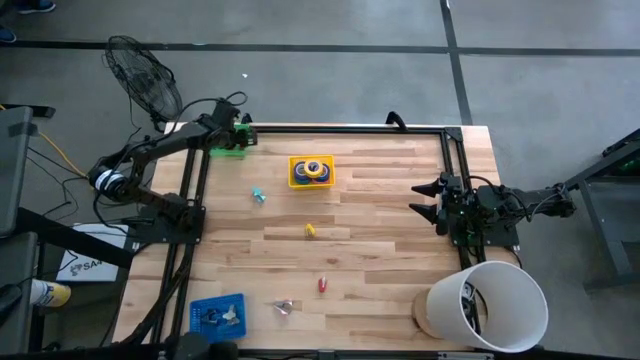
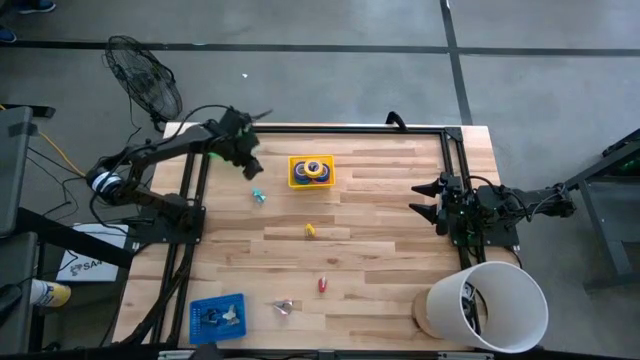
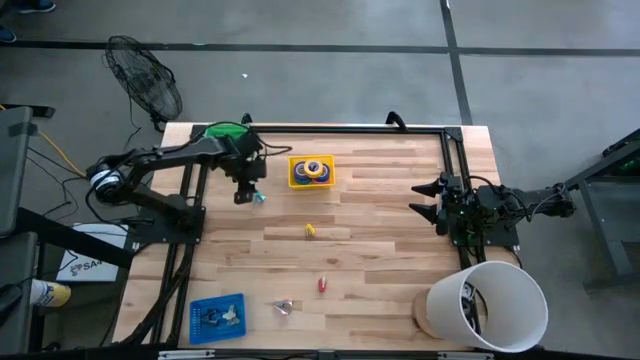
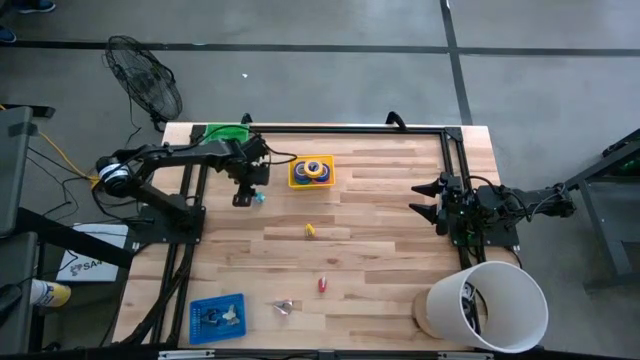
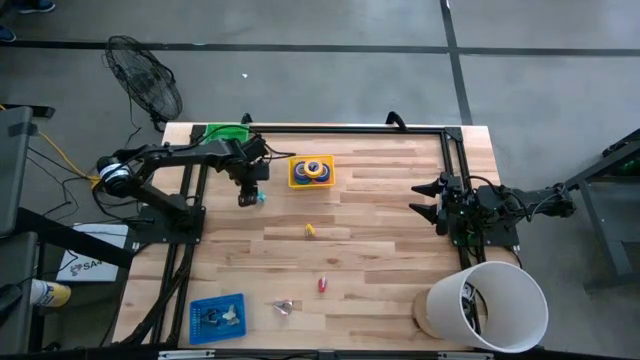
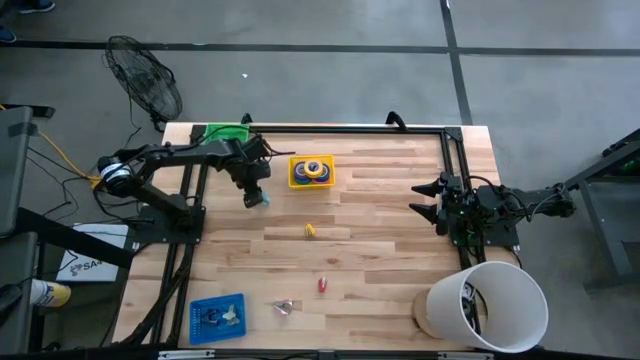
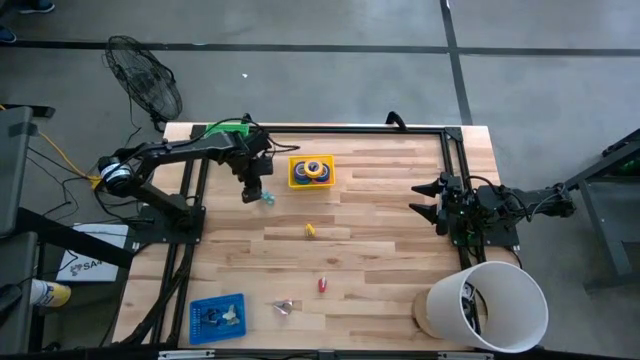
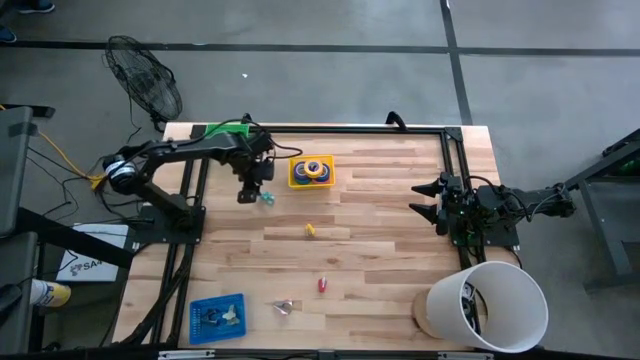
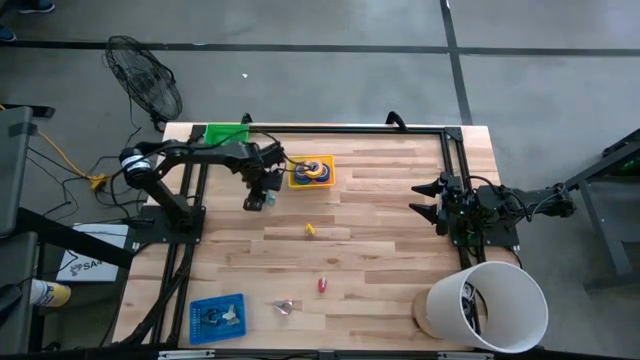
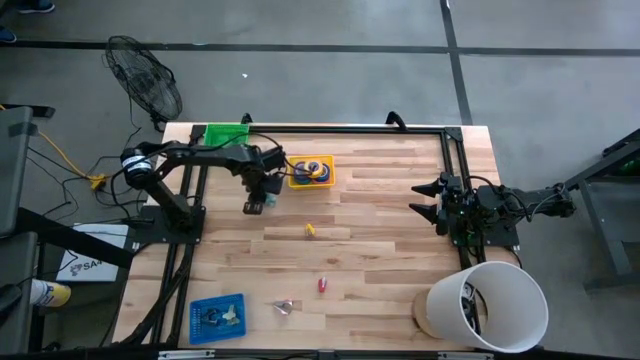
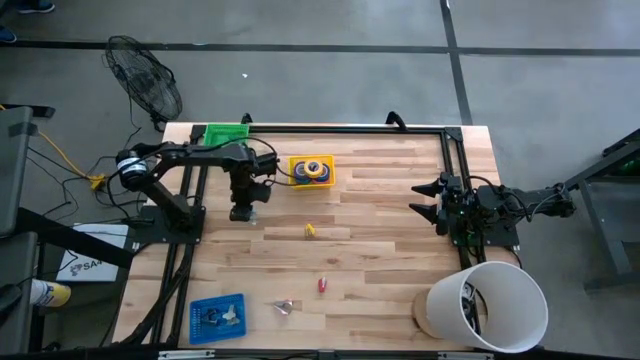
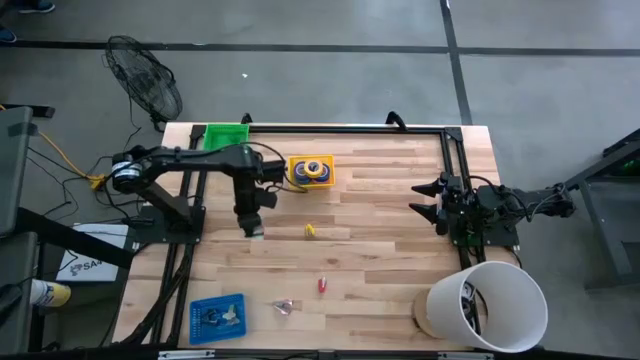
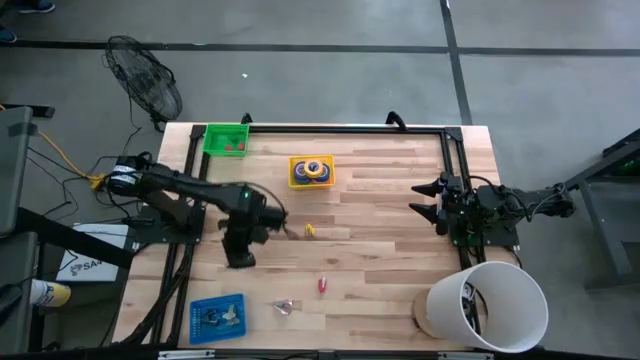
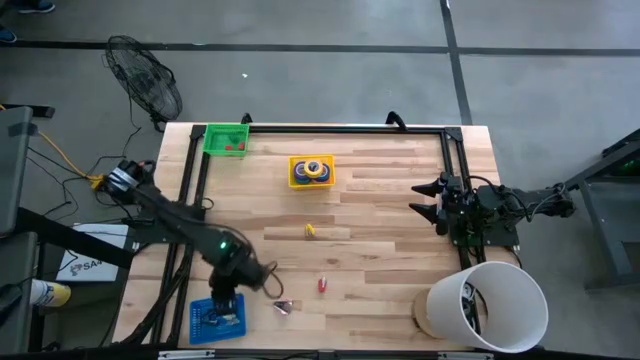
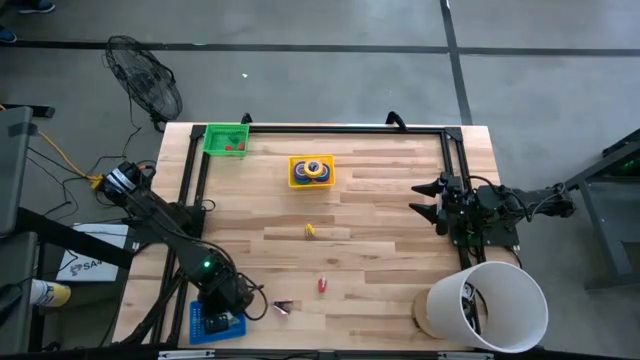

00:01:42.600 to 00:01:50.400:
Task: Pick and place Stapler, Stapler remover, tape
Put the light blue staple remover into the blue bin

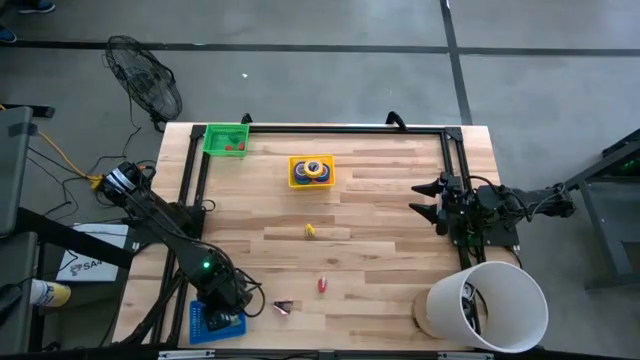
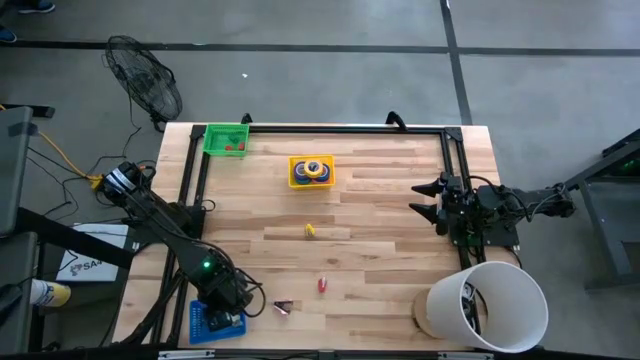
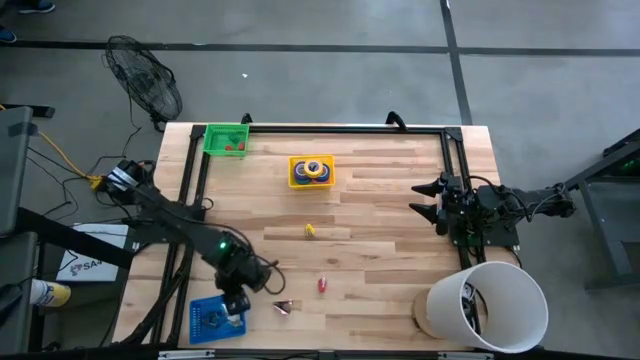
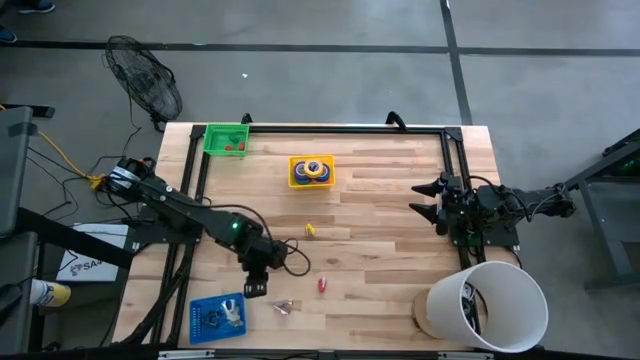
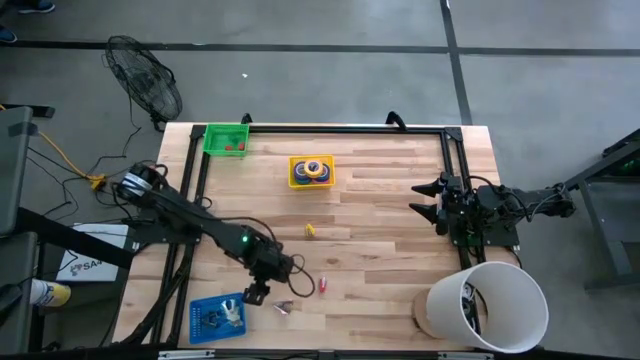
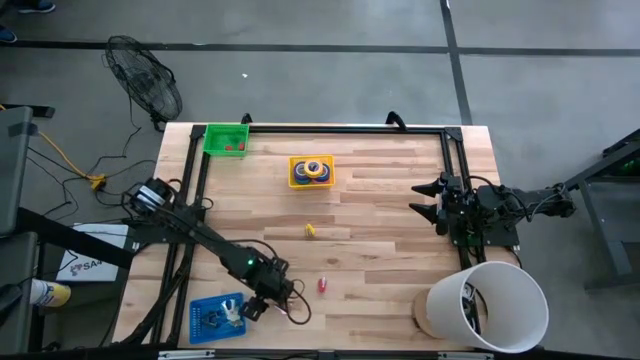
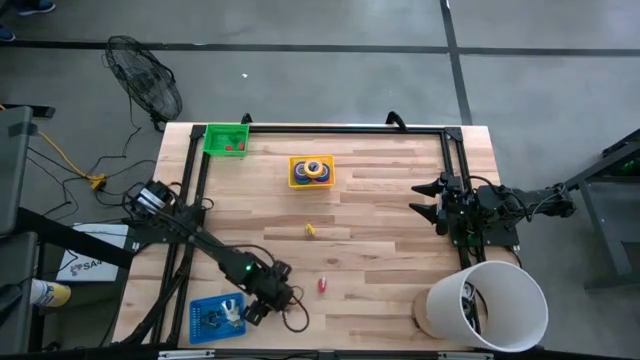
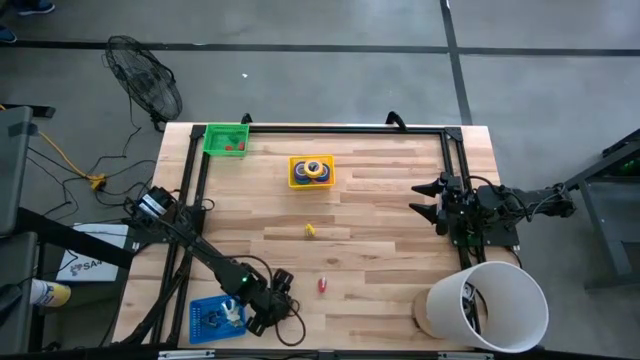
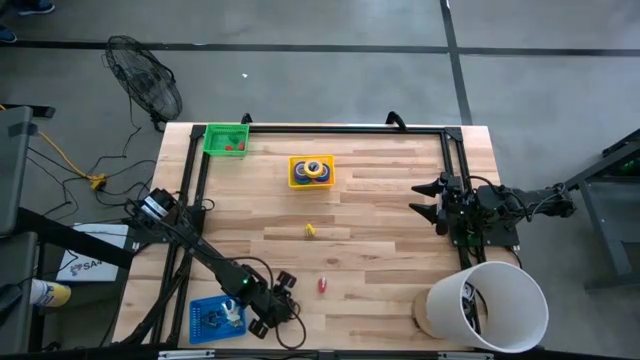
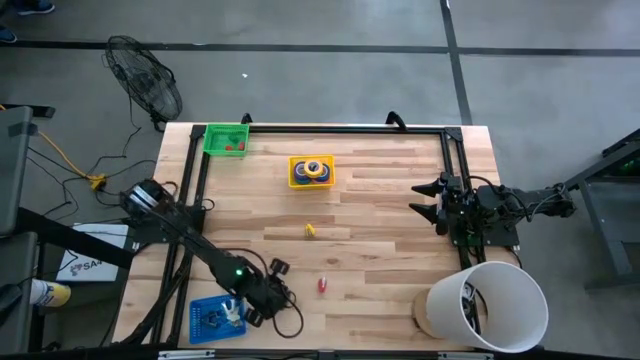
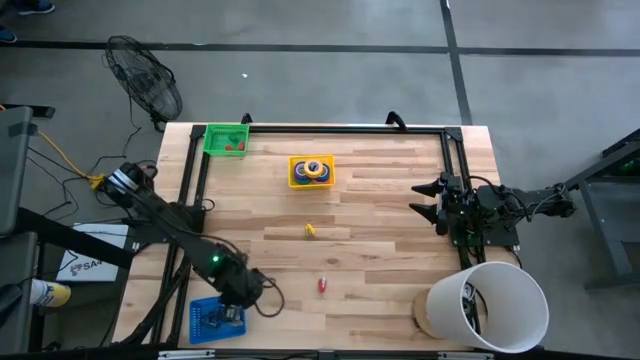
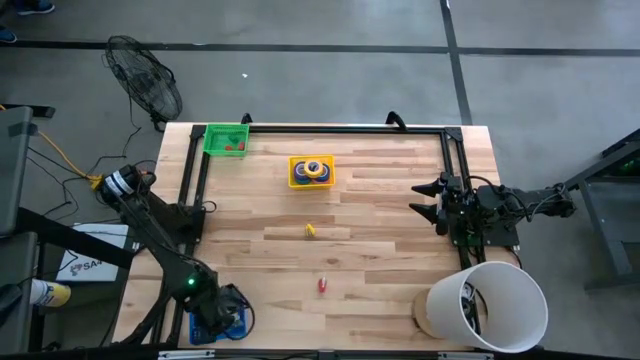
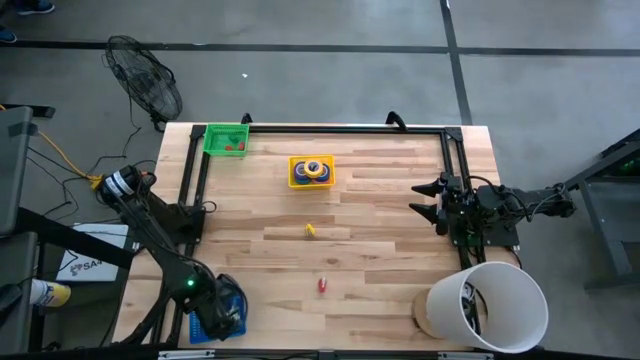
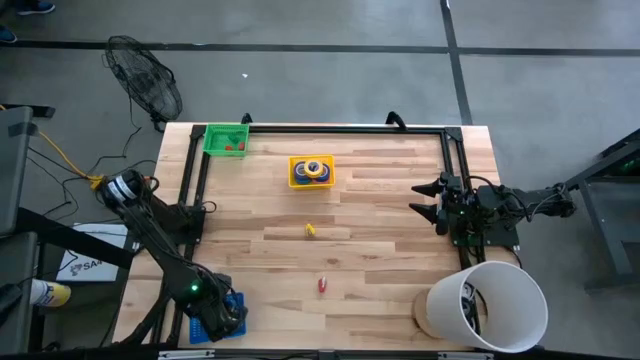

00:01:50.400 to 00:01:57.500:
Put the pink staple remover into the blue bin

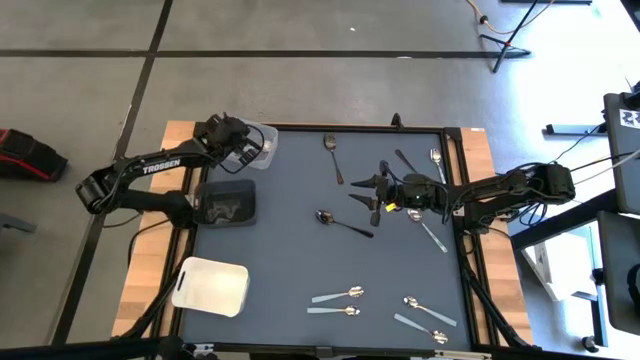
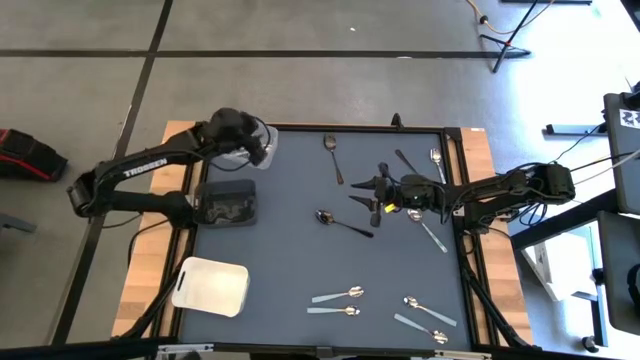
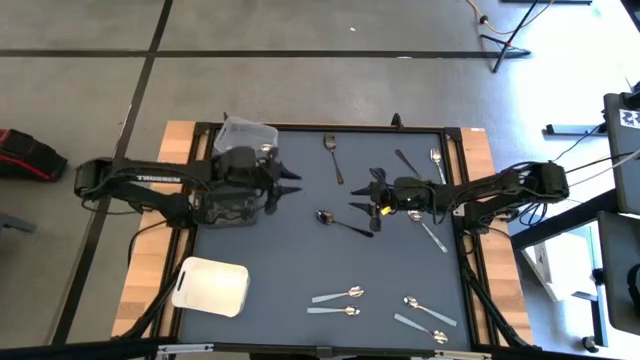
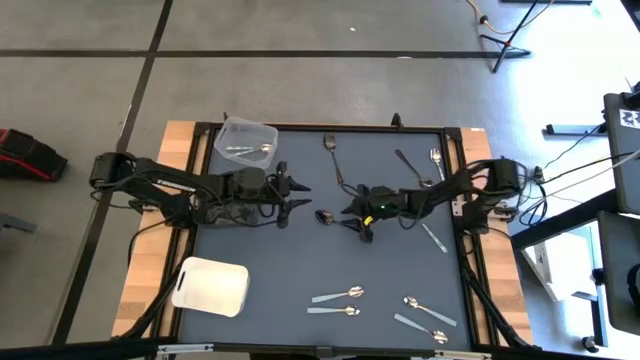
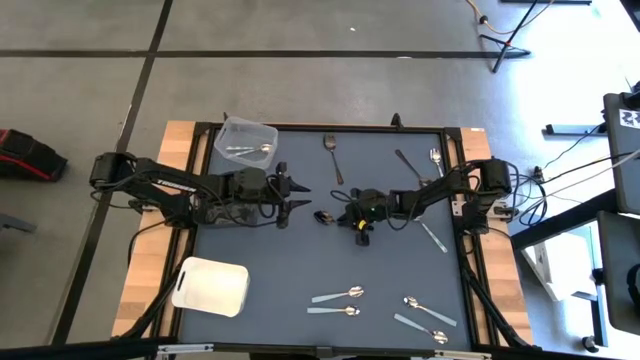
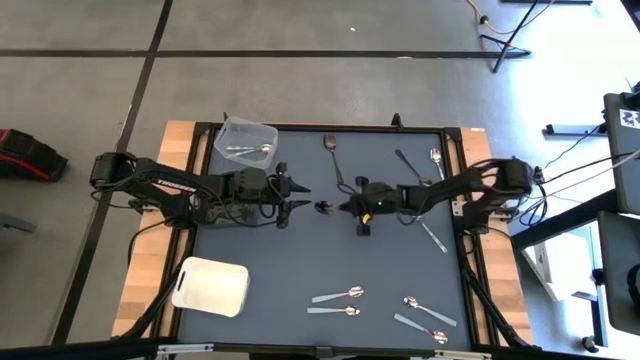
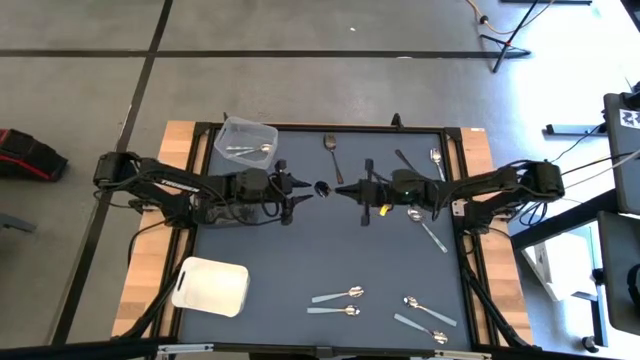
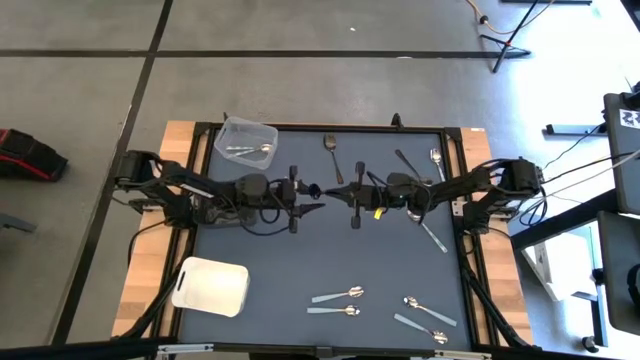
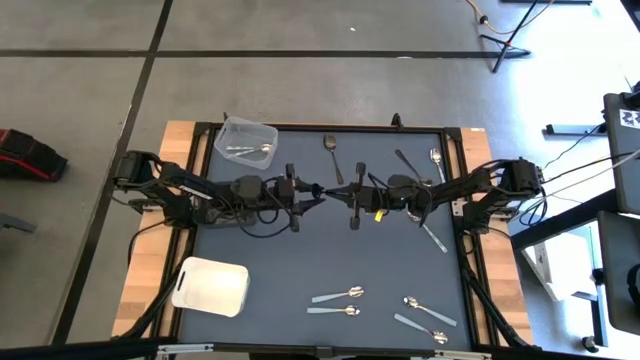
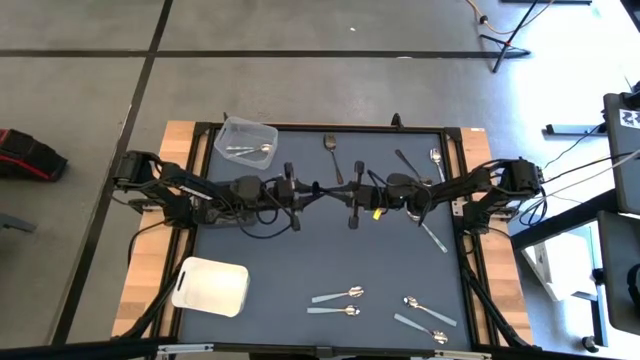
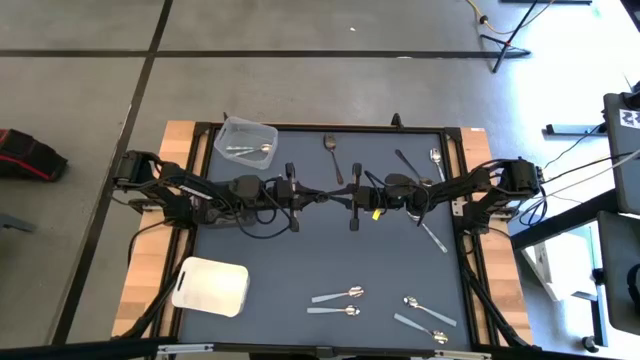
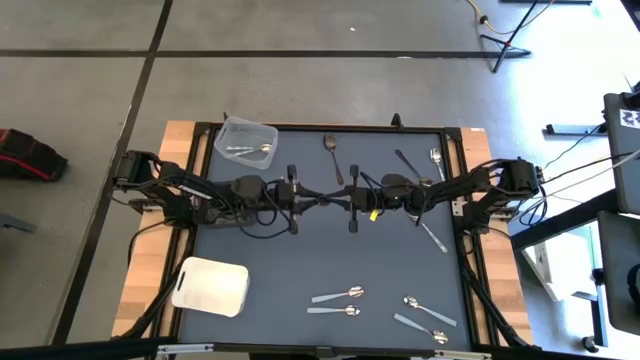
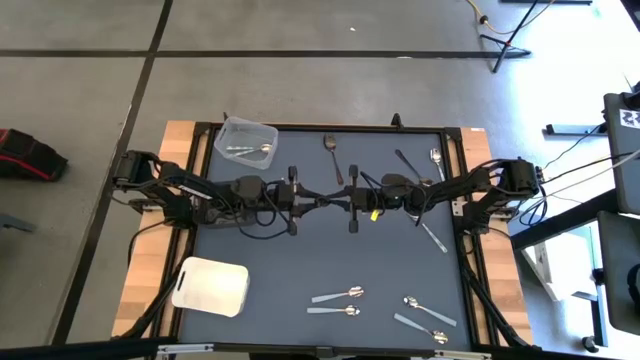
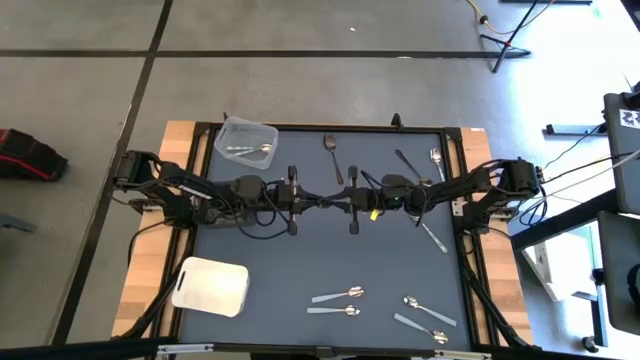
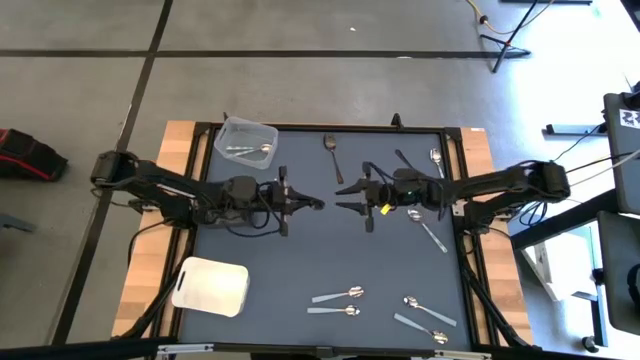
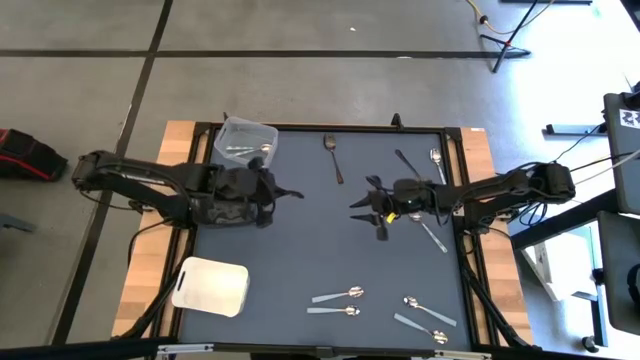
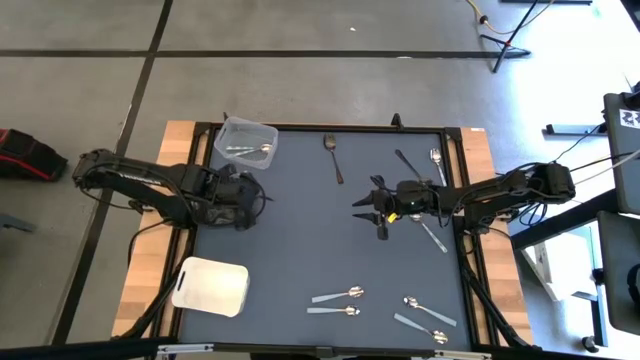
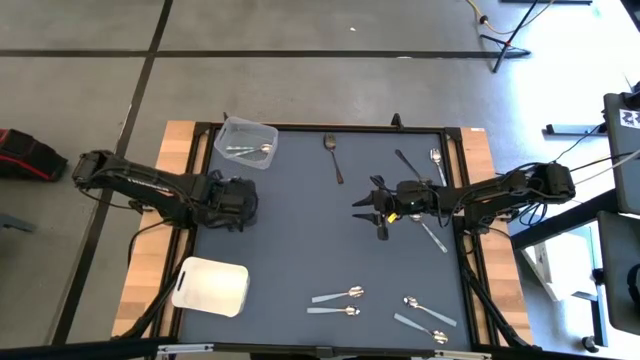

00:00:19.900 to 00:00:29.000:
Task: Sort silverware by color (type)
Put the black spoon into the black bin
